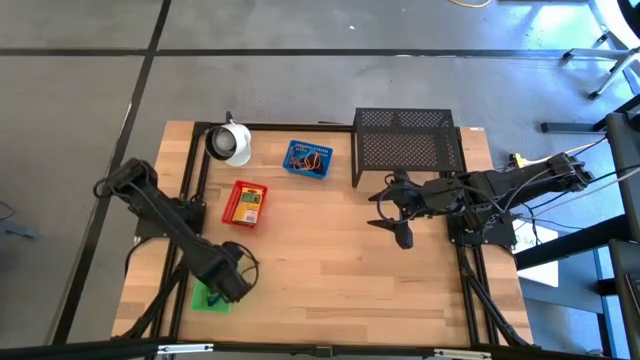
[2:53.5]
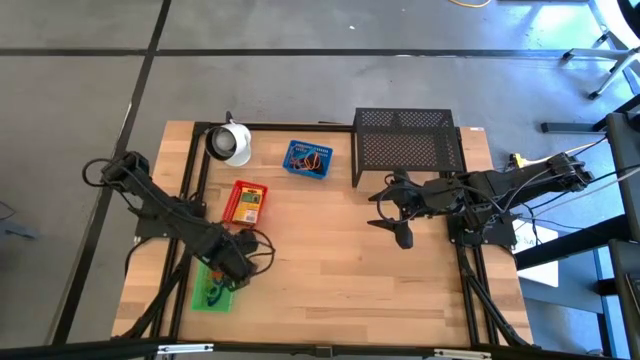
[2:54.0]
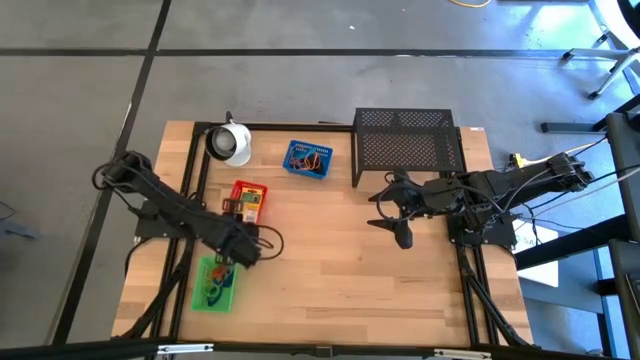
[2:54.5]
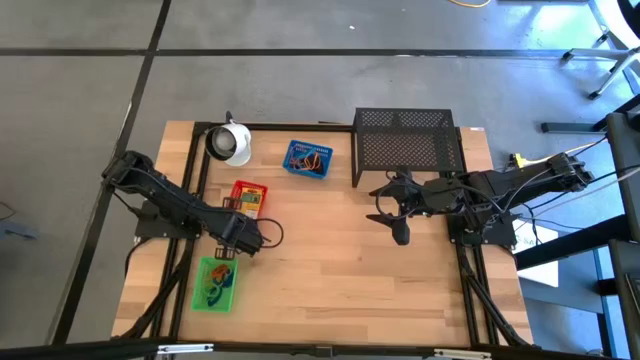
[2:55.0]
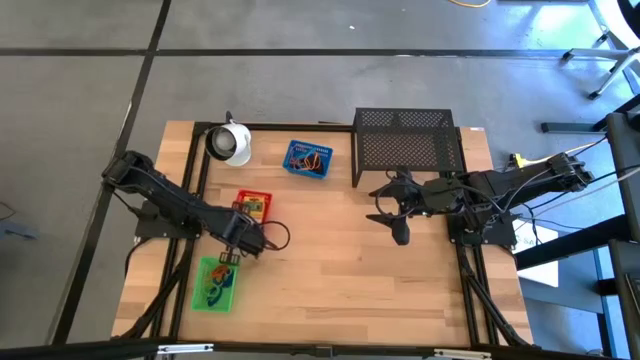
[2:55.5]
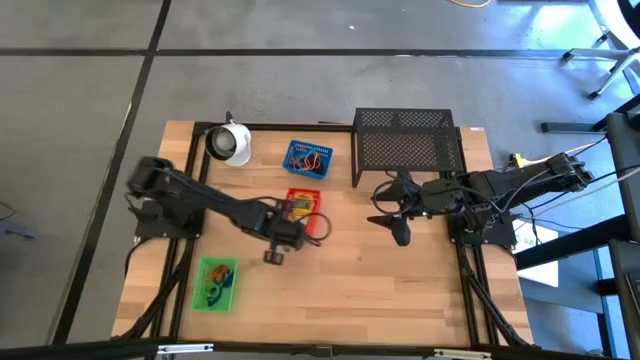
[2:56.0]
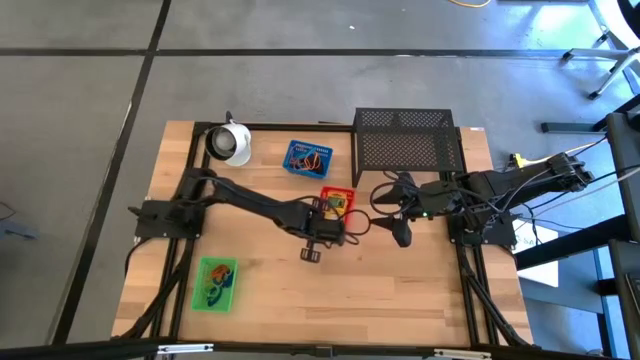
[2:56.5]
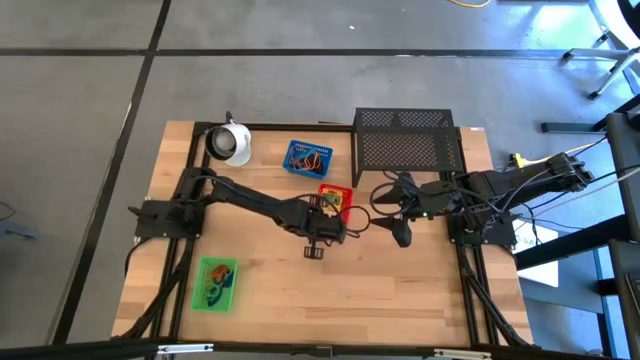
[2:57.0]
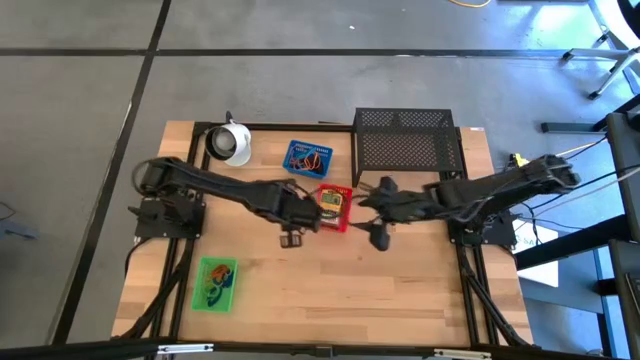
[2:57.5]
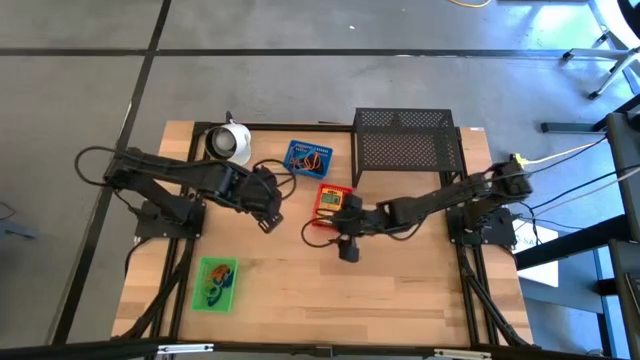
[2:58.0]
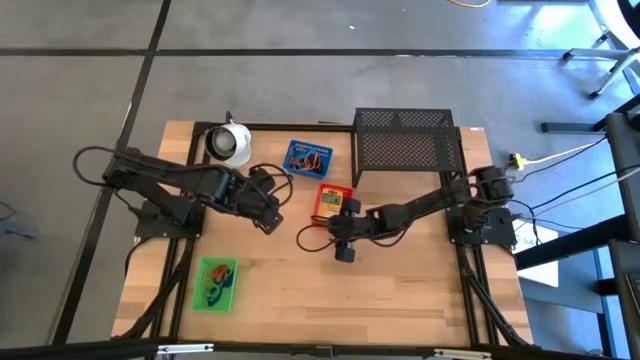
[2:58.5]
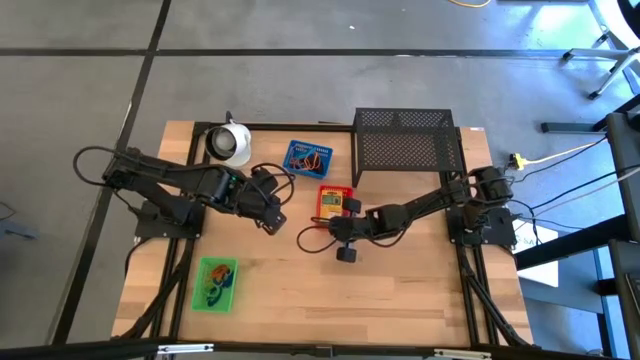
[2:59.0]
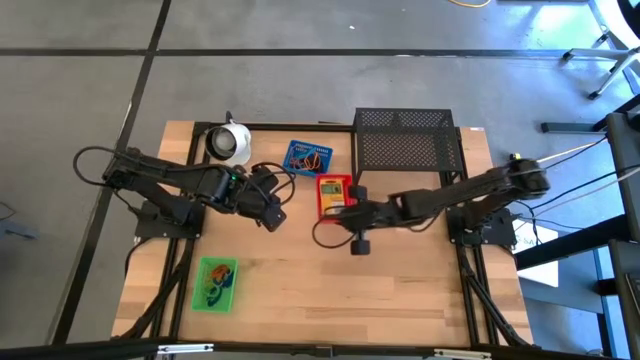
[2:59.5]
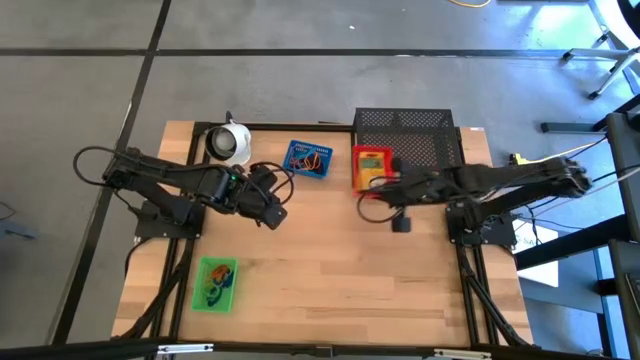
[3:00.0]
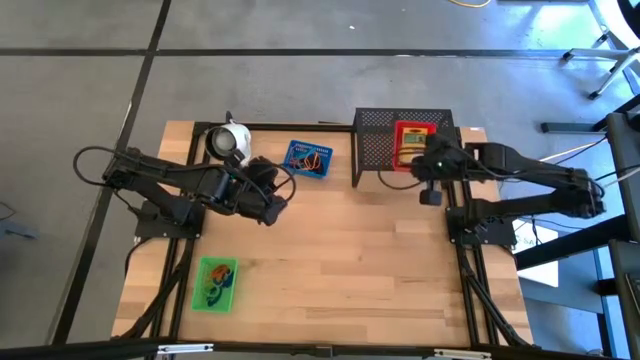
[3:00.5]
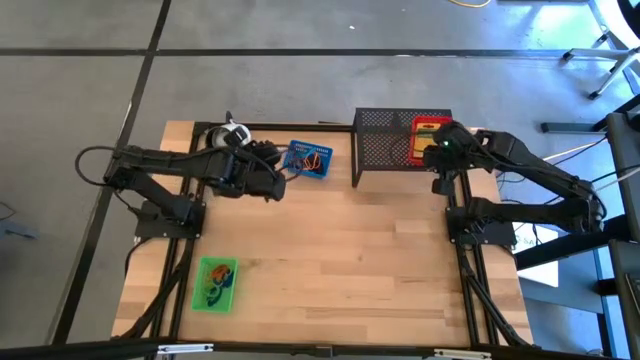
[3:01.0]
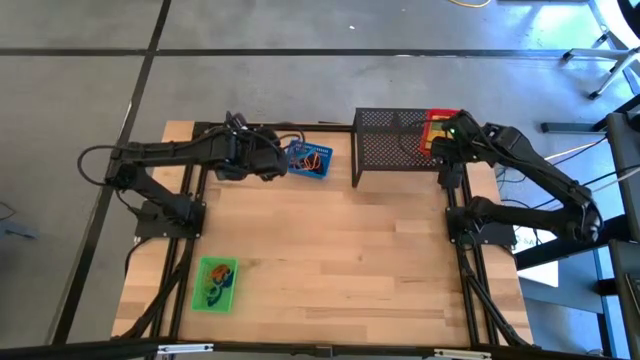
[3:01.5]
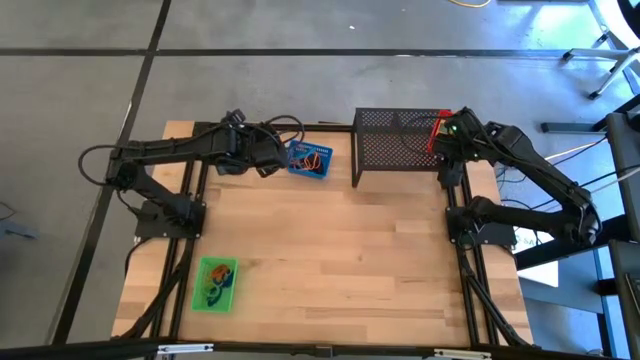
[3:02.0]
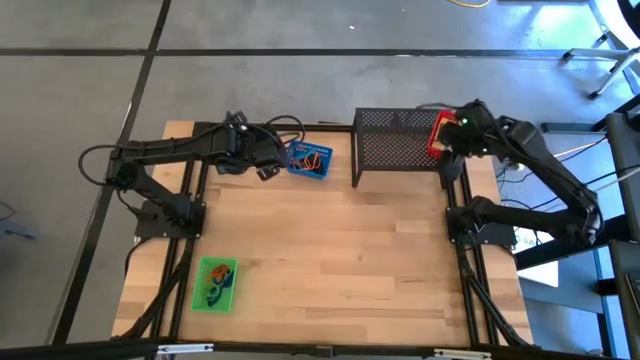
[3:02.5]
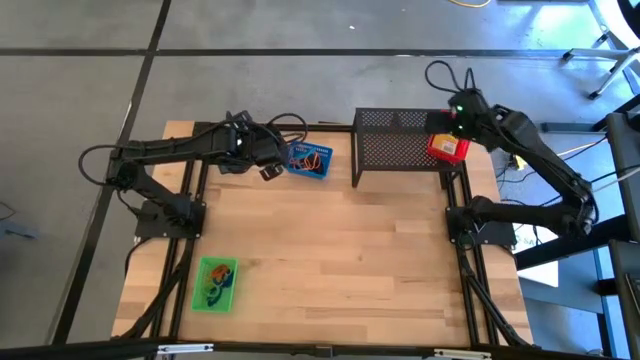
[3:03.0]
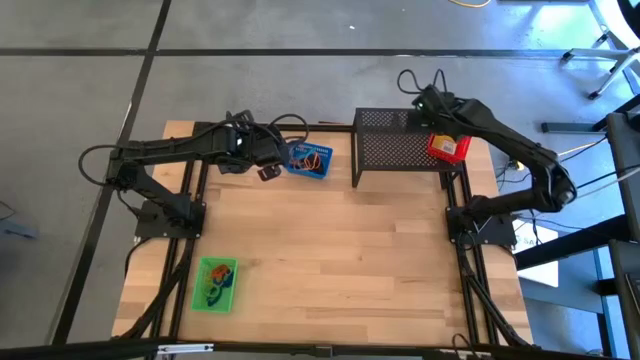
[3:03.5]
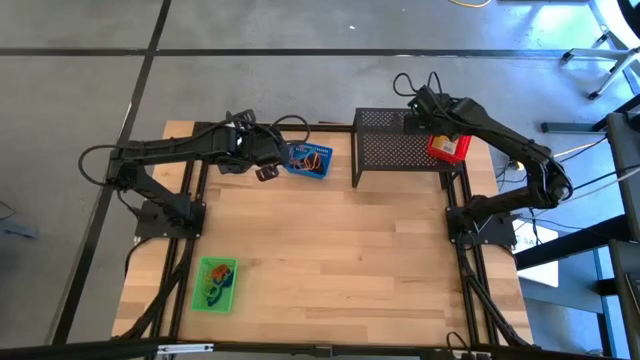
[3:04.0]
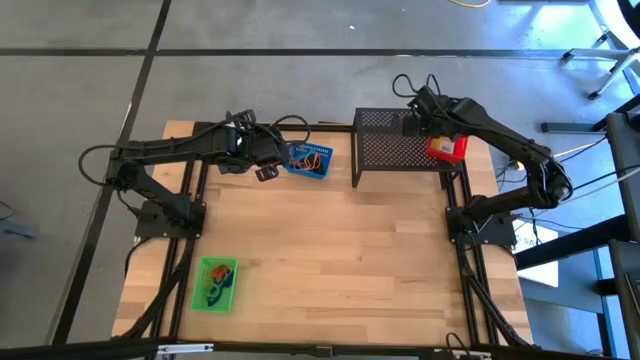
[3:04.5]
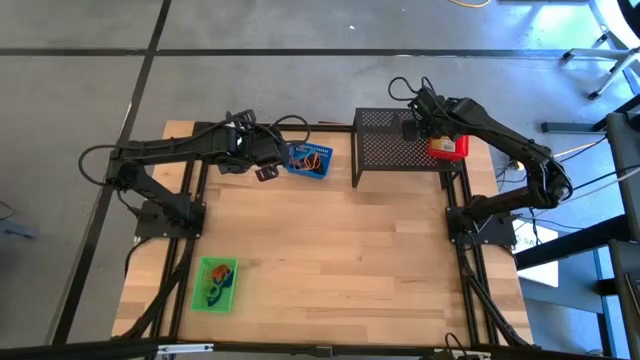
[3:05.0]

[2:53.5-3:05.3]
Task: Pick & Place Office Desk Supplies
Put the red bin with yellow crayon boxes on the shelf

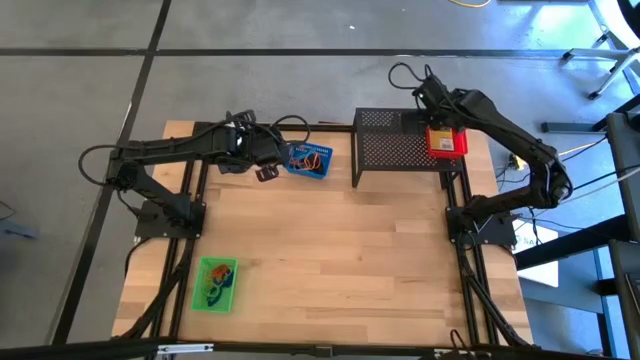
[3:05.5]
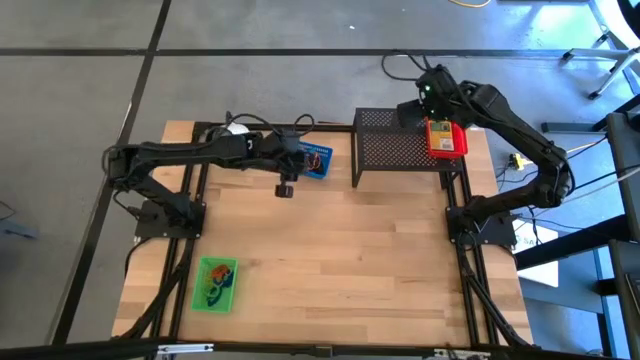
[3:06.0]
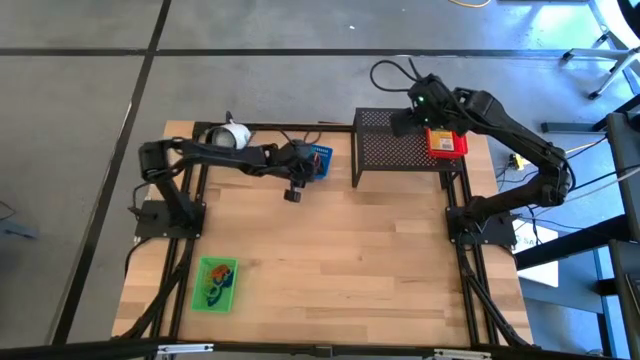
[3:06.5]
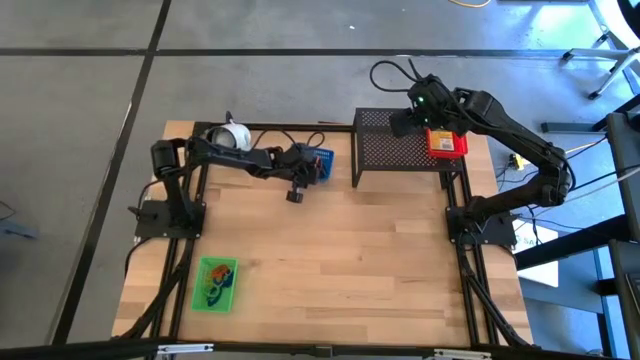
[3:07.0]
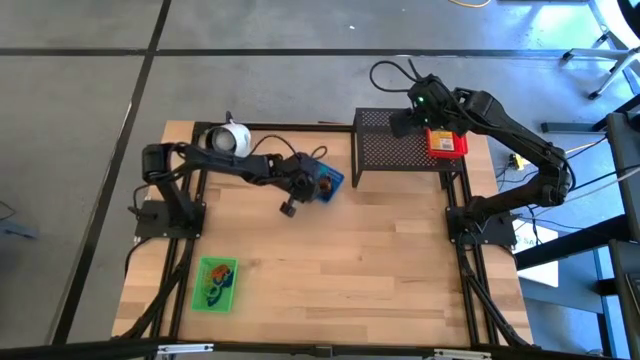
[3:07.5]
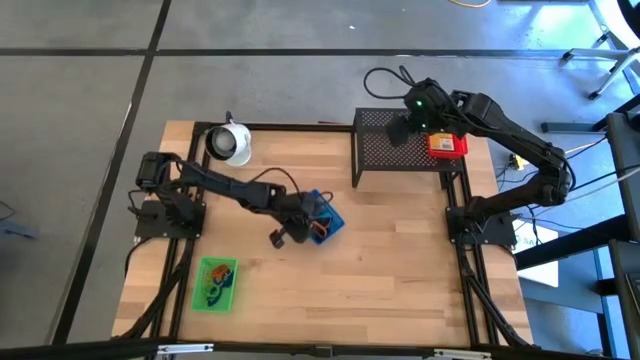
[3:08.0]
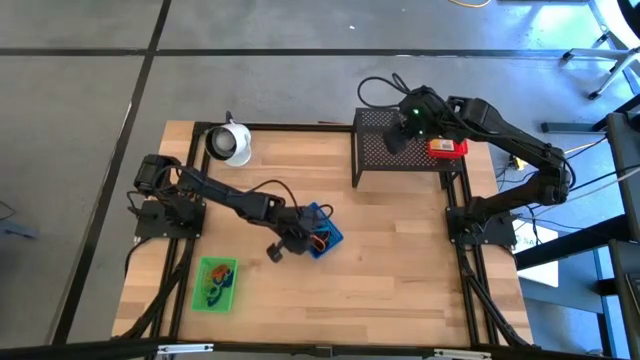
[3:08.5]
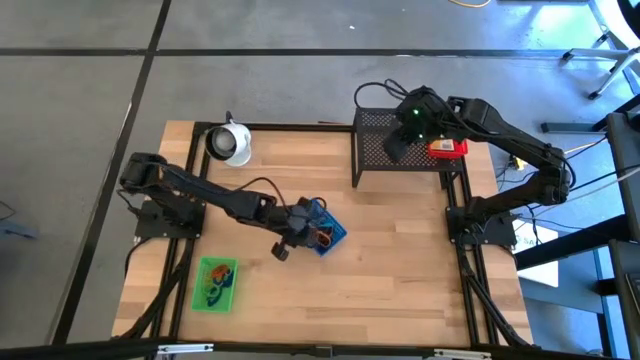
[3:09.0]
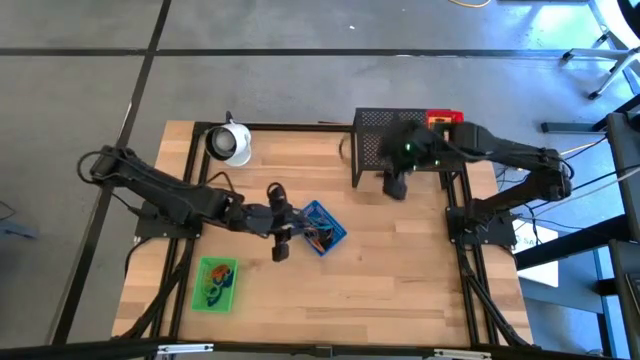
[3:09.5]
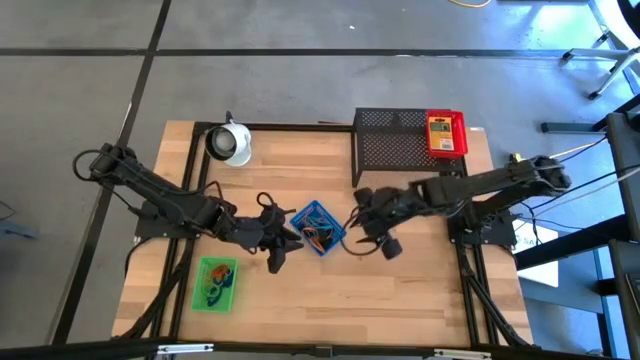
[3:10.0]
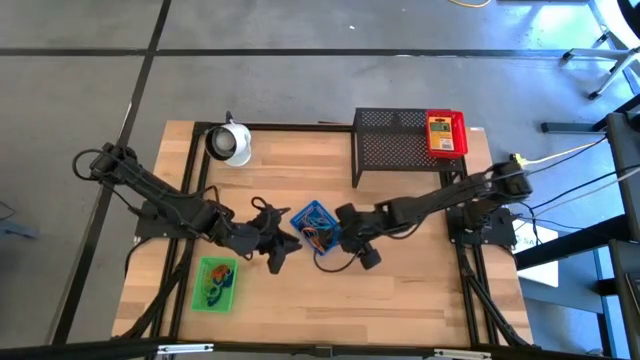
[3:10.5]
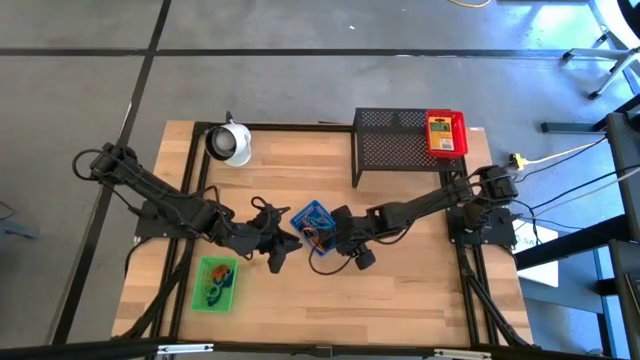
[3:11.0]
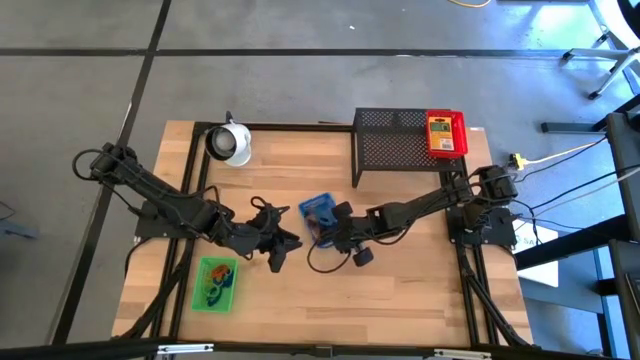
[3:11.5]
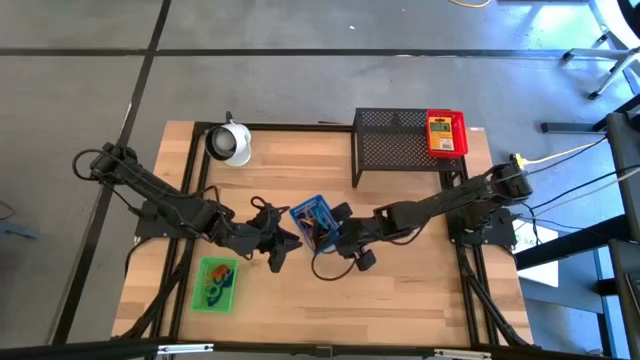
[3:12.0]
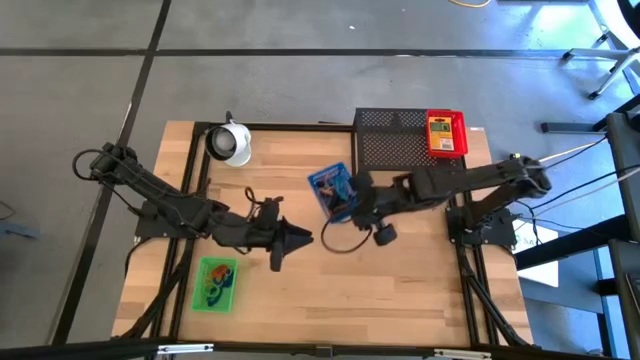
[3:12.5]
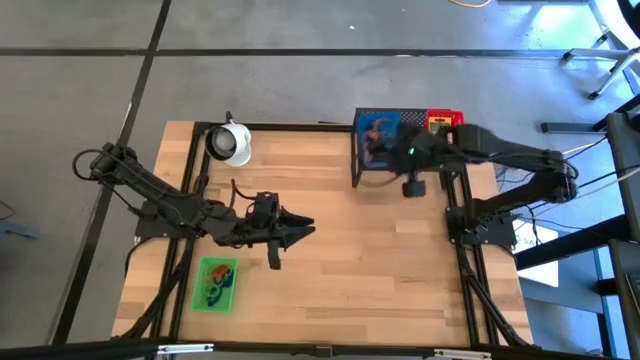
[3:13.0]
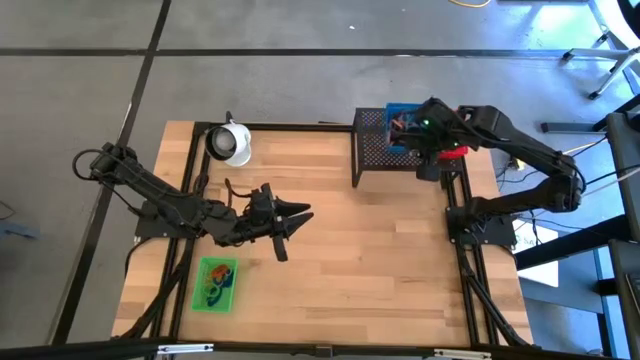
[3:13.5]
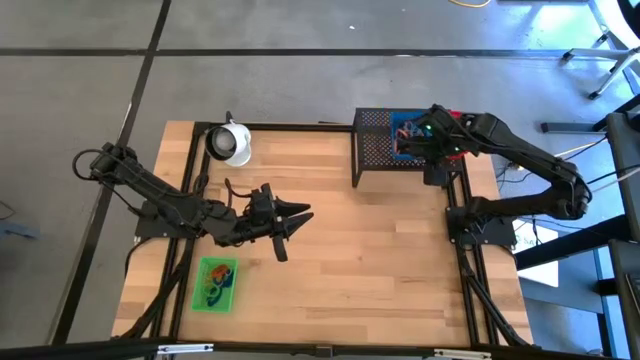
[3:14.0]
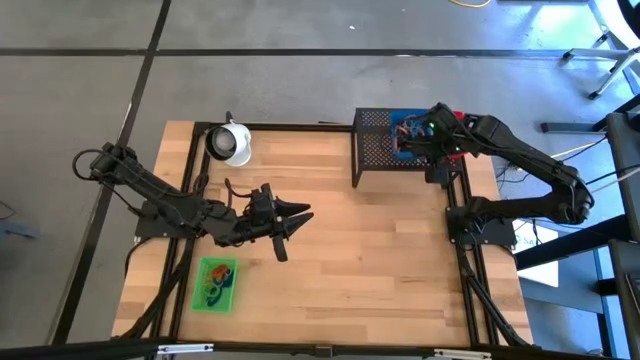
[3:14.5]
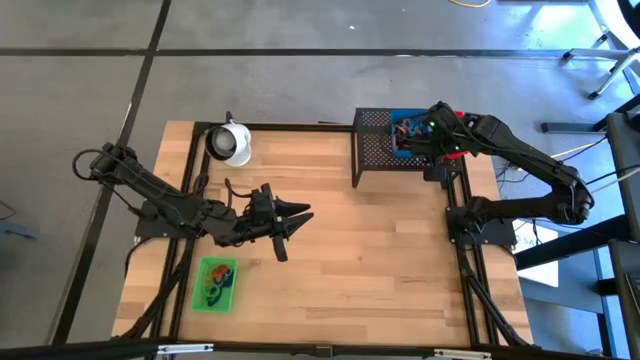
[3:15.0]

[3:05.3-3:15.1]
Put the blue bin with rubber bands on the shelf
